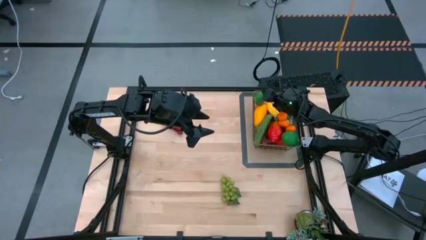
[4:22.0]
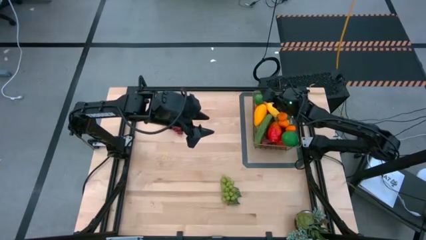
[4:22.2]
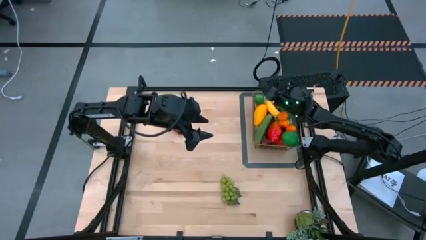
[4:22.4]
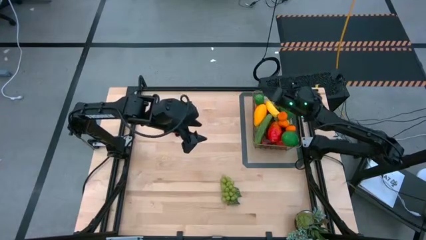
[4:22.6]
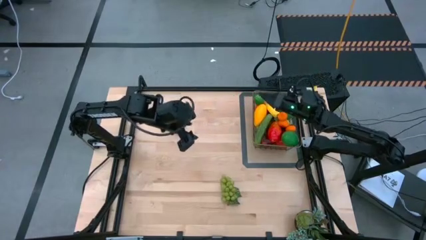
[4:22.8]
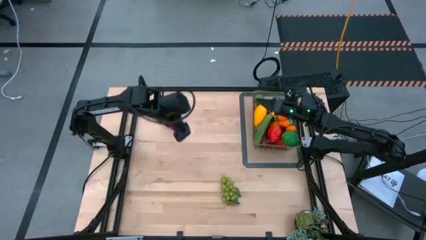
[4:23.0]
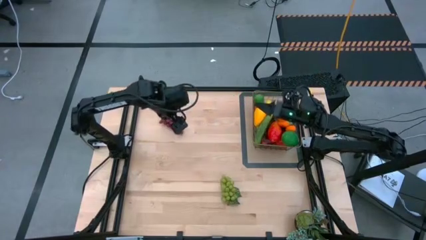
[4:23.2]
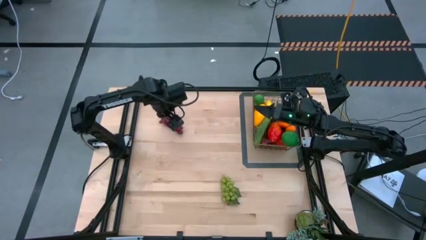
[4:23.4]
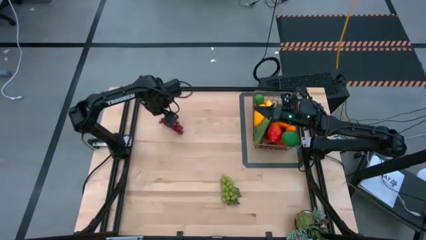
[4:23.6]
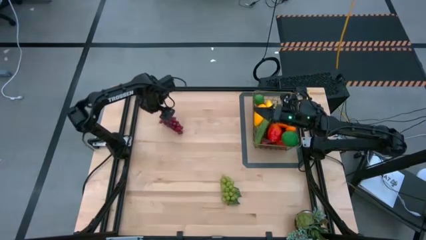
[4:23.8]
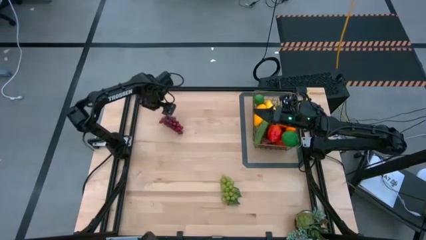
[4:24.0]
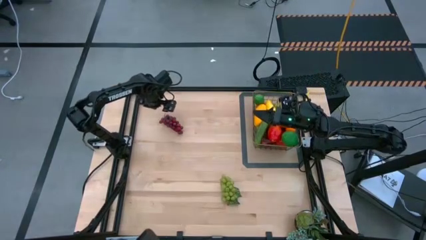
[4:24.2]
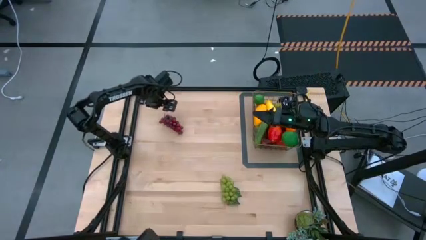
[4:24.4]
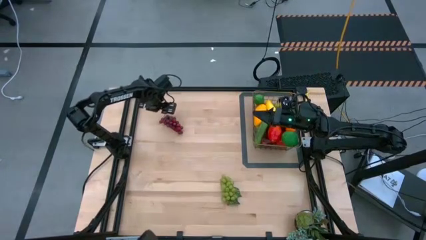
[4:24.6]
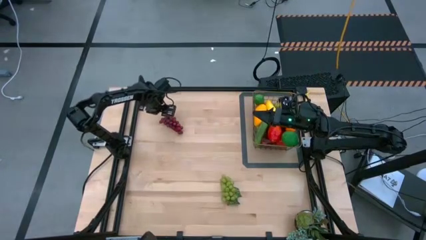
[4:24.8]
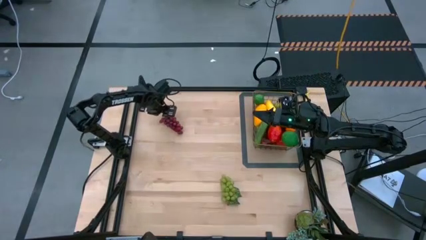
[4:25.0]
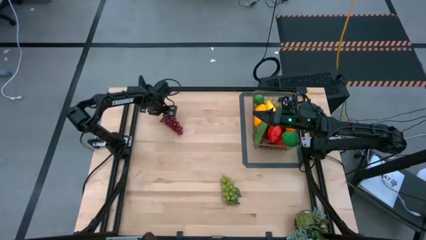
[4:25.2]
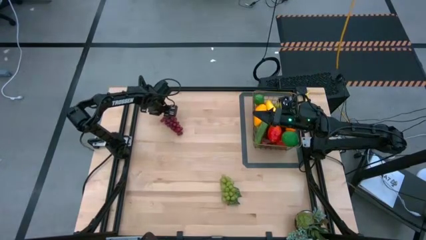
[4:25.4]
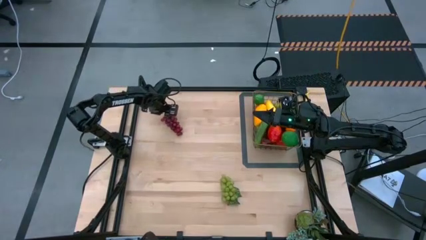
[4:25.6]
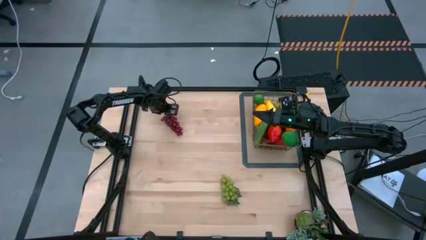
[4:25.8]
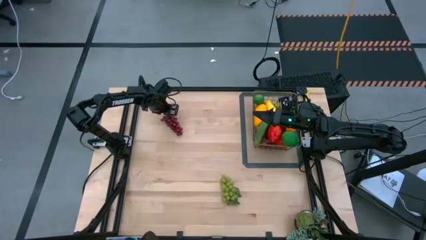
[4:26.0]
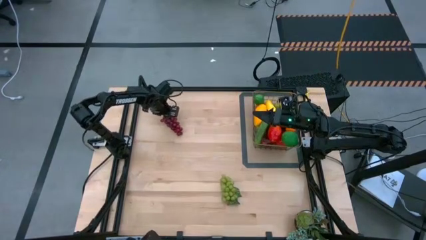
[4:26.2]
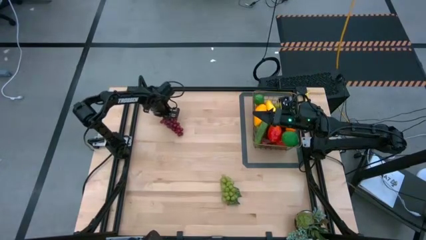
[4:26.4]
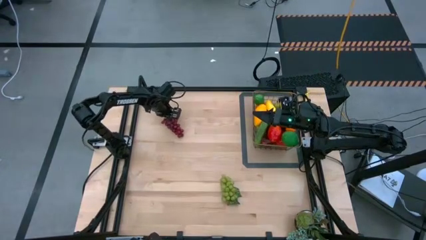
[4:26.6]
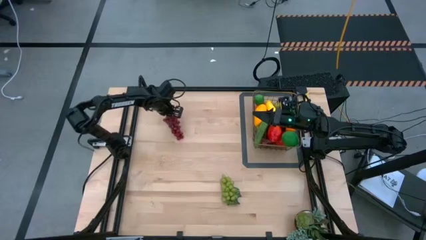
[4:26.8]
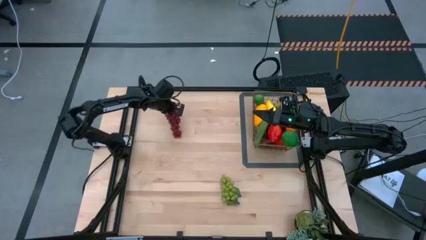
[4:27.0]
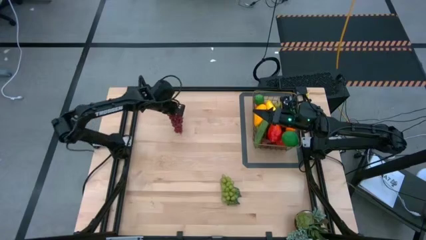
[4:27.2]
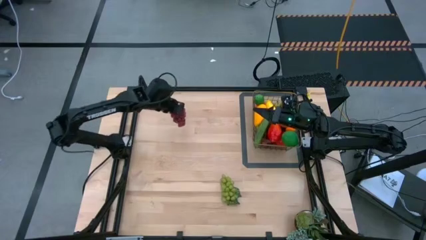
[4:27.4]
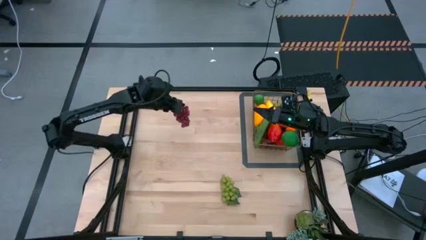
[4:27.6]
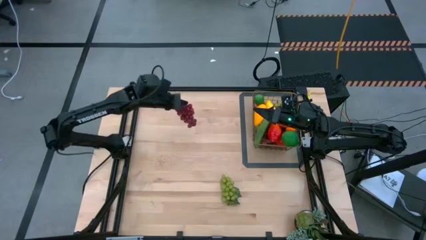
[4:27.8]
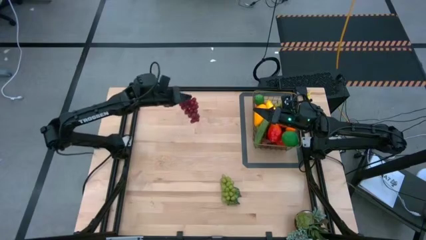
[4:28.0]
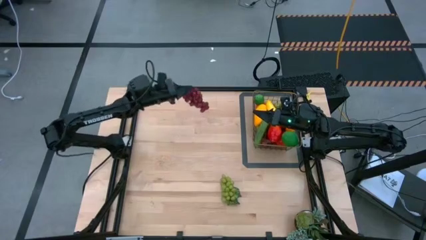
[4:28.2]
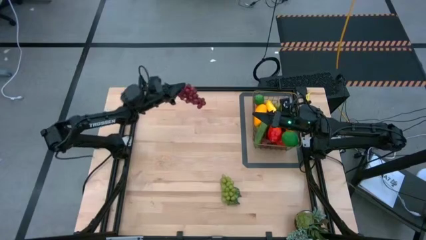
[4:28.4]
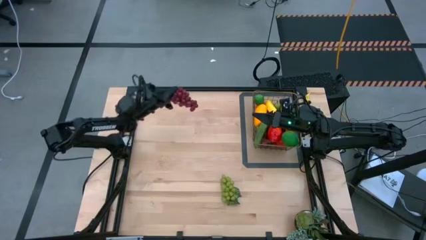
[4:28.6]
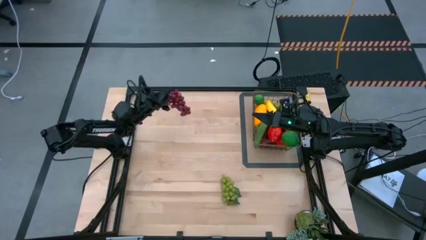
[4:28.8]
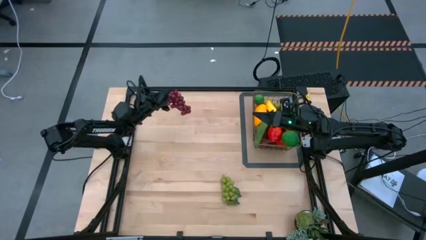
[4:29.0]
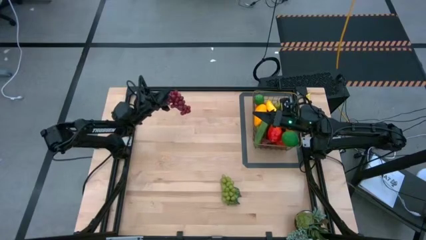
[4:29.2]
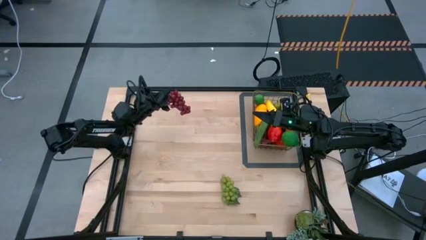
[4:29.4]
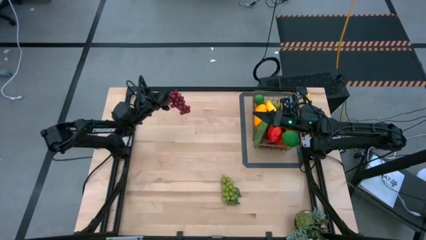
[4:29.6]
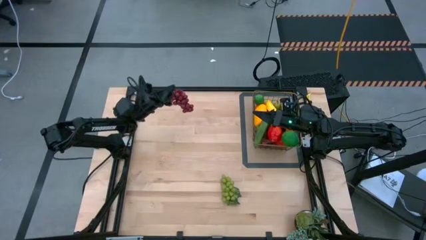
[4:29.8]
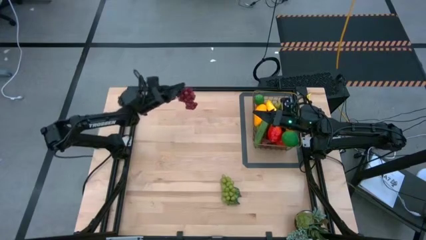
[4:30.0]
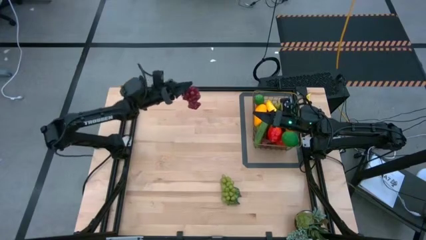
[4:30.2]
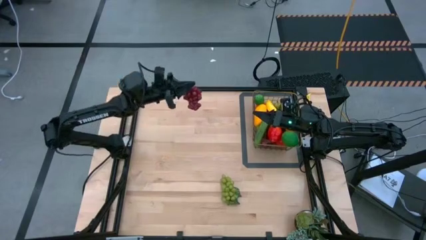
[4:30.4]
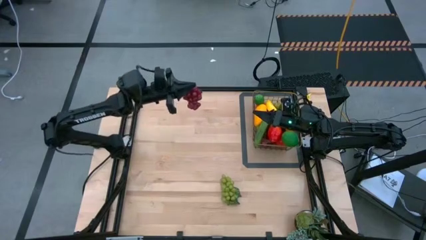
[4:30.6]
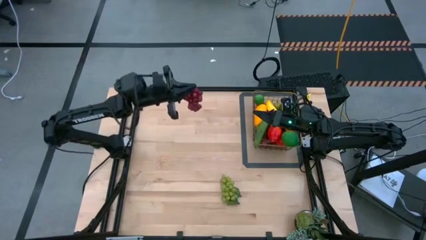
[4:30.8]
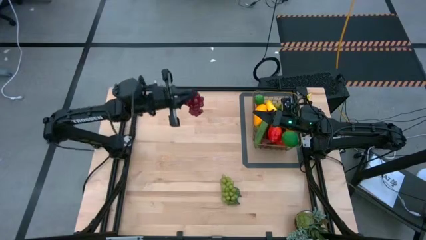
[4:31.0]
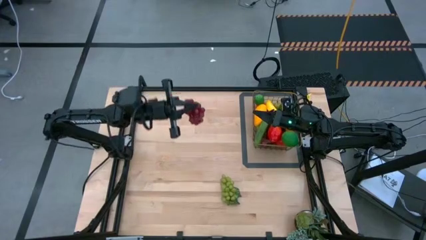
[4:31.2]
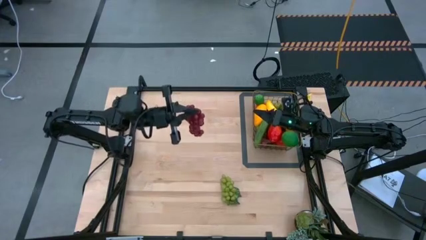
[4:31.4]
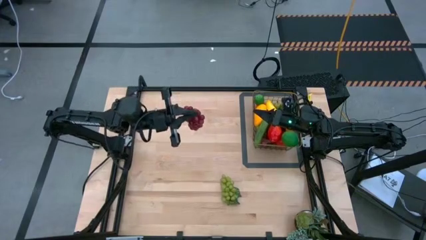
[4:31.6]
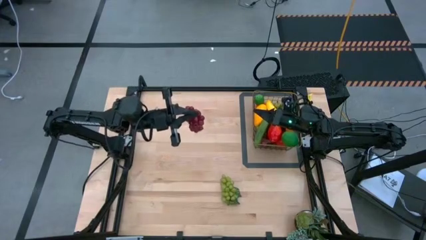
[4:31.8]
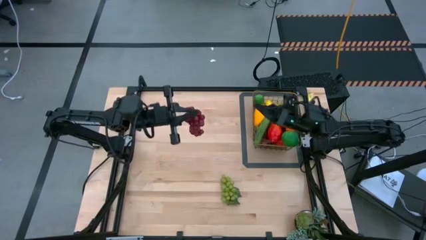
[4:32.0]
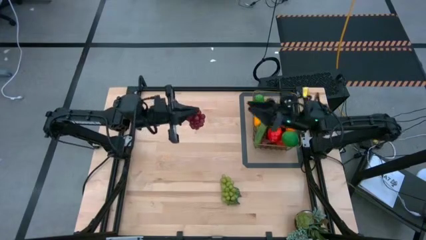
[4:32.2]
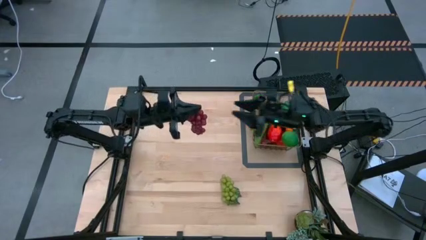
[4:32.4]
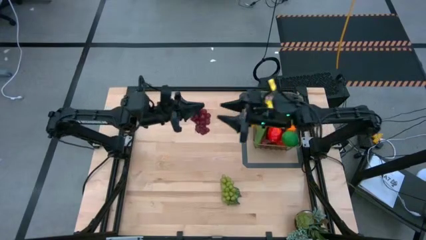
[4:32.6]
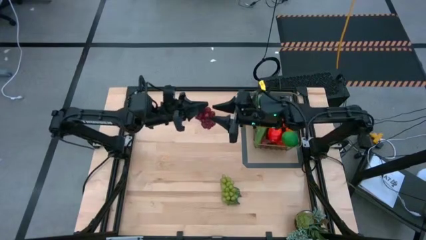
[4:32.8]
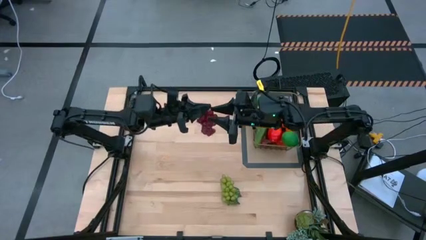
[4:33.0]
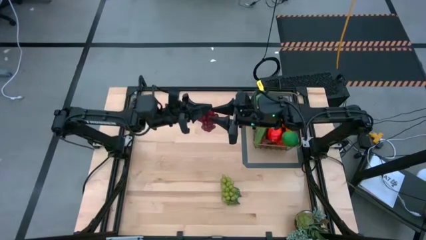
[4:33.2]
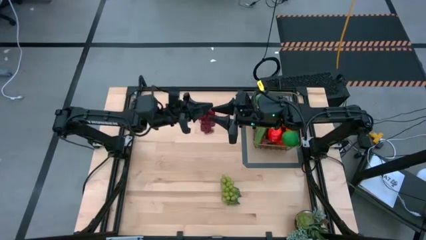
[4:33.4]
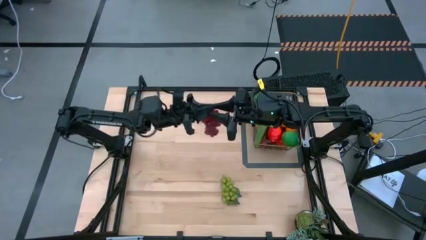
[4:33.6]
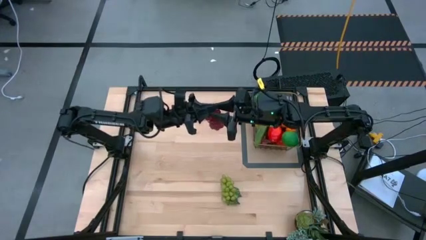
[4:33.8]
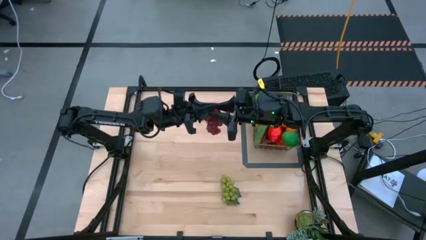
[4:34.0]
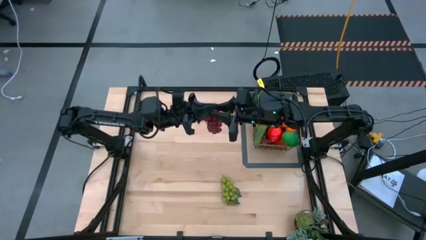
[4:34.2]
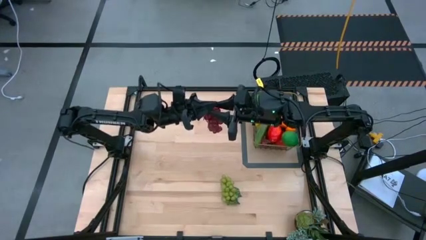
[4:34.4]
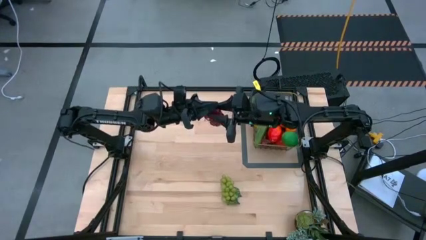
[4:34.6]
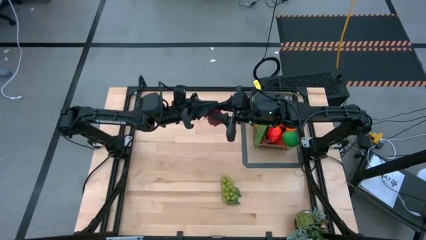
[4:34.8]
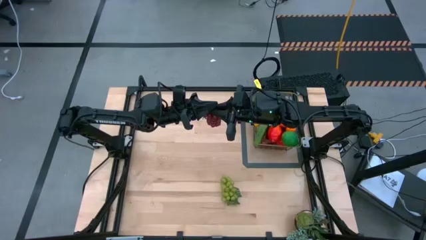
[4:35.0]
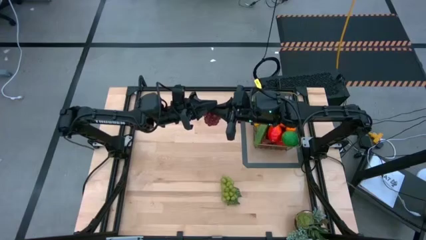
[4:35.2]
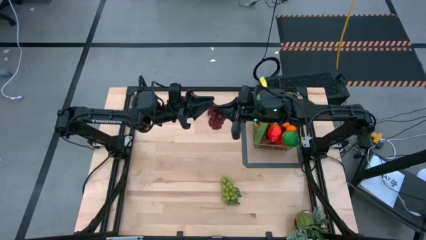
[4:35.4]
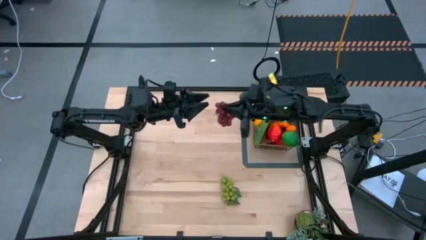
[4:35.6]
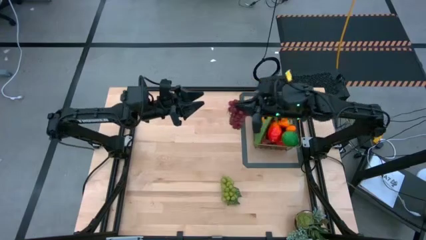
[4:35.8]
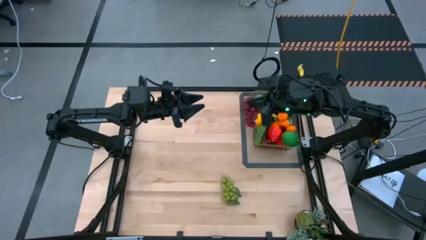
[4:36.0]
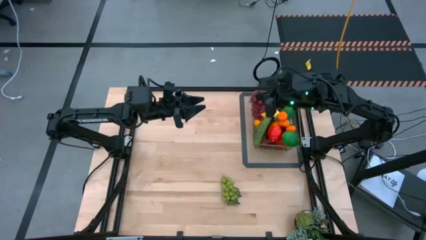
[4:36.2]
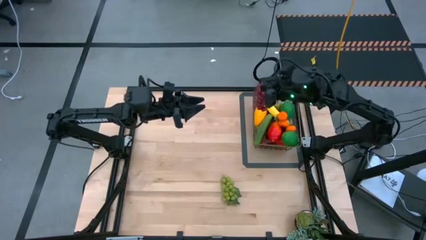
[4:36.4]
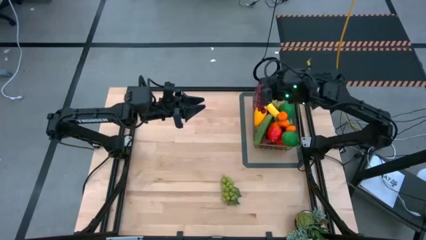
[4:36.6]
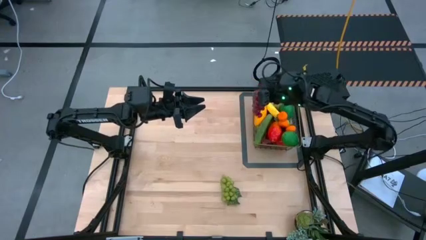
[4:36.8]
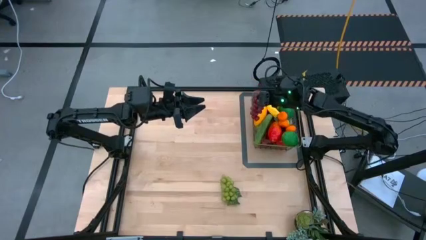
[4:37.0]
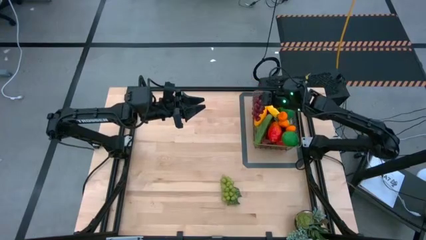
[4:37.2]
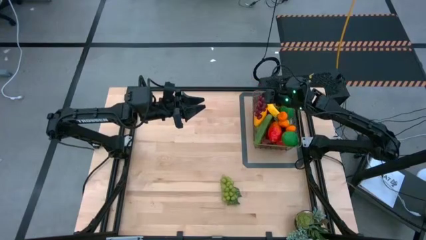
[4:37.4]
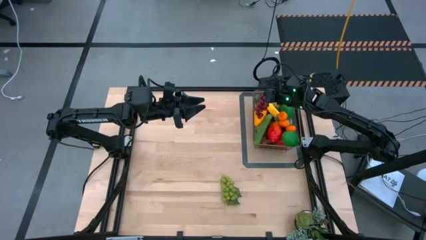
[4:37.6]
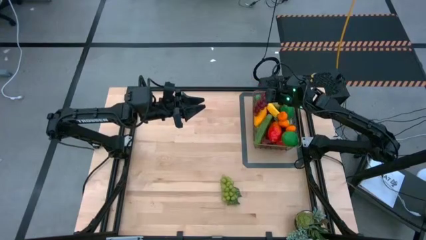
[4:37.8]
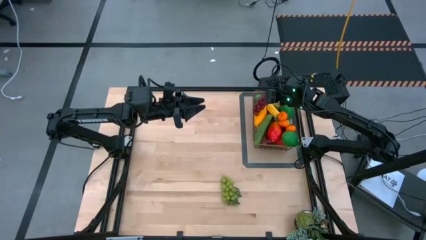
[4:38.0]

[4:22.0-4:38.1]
Task: Build produce basket
Put the red grapes into the wire basket

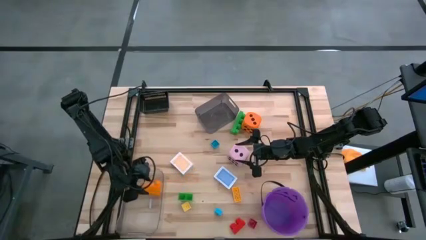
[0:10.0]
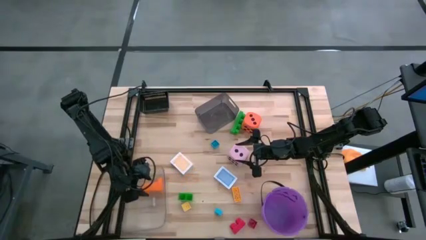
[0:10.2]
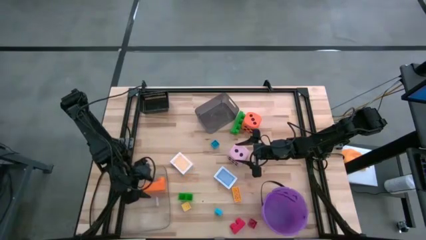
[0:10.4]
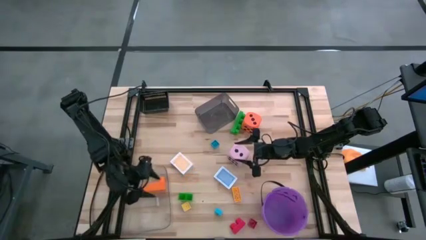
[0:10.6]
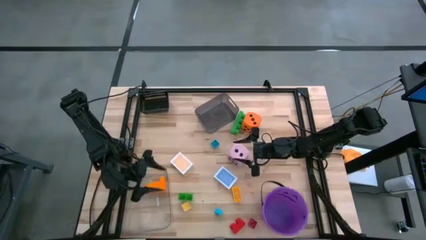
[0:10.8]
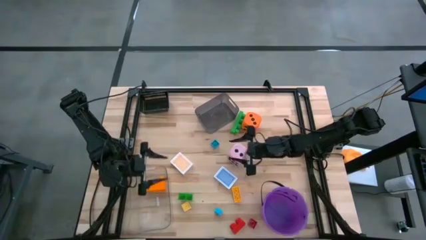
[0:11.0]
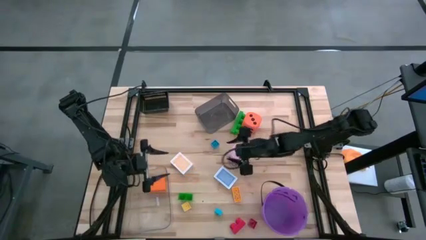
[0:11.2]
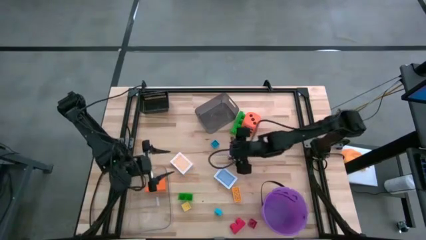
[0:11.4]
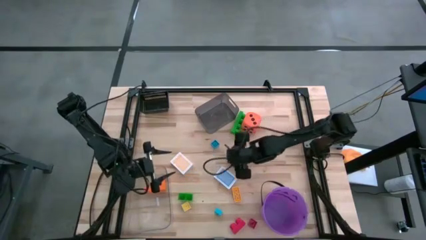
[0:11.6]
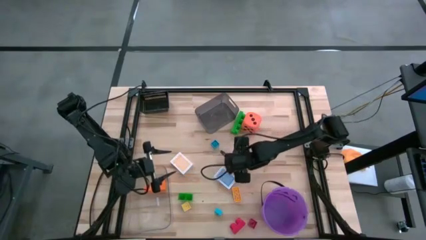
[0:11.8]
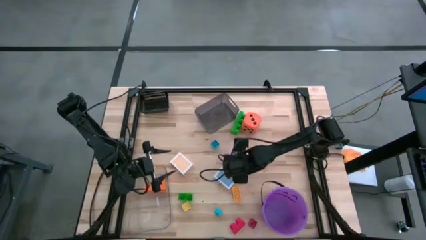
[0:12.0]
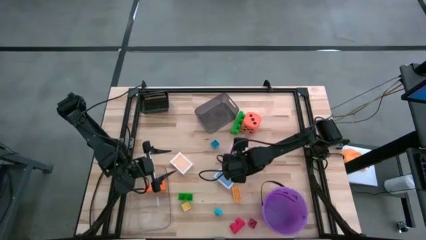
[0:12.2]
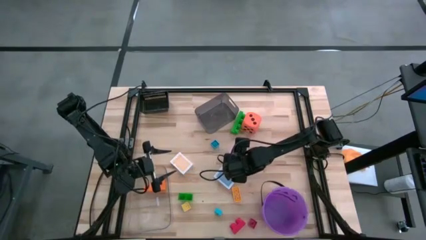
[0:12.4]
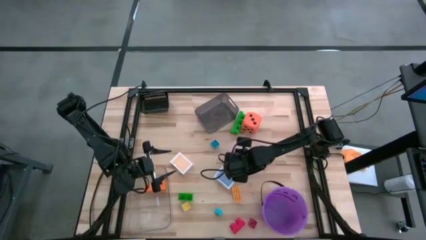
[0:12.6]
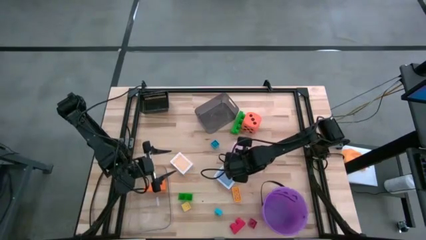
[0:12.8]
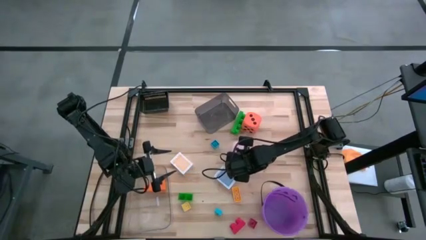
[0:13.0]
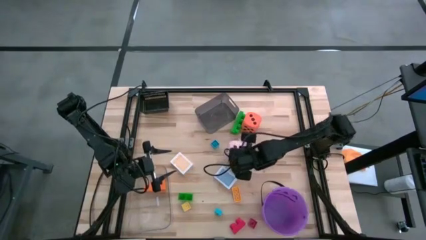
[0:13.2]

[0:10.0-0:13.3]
Task: Pick & Place Toys
Put the pink dice on the gray bin
